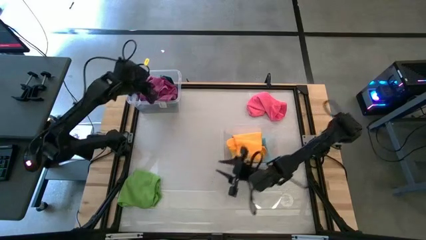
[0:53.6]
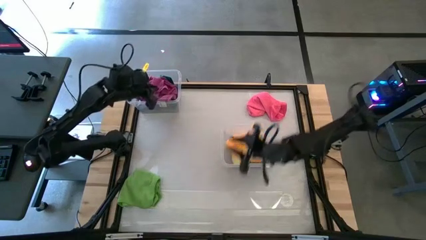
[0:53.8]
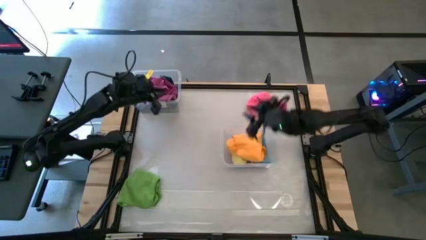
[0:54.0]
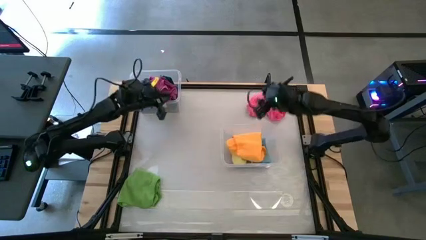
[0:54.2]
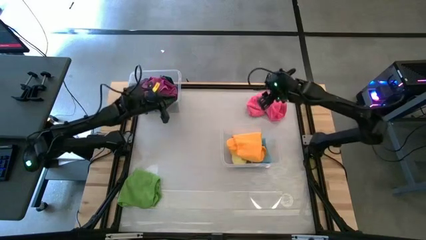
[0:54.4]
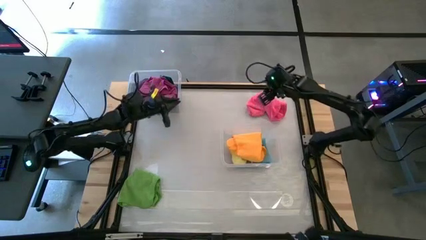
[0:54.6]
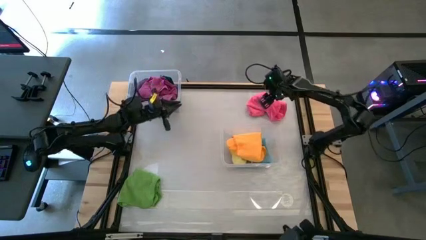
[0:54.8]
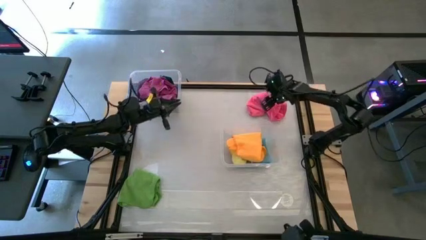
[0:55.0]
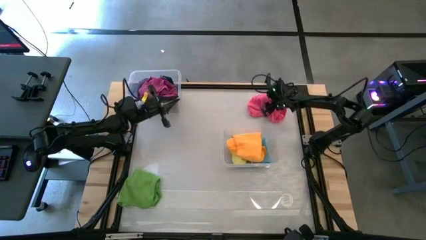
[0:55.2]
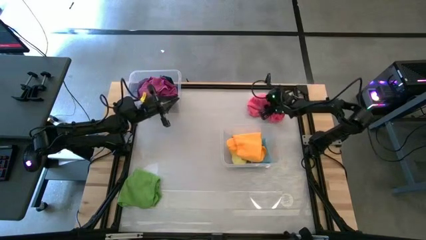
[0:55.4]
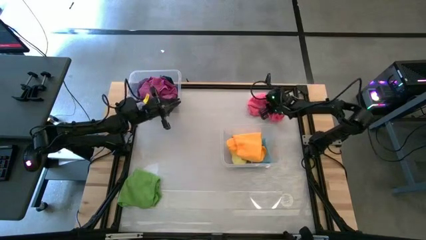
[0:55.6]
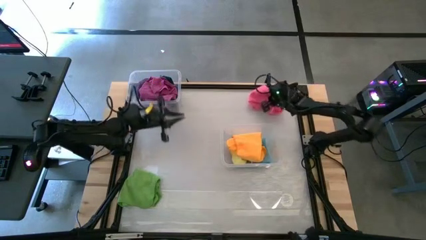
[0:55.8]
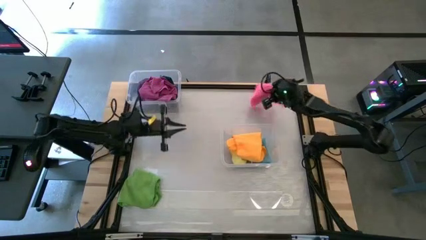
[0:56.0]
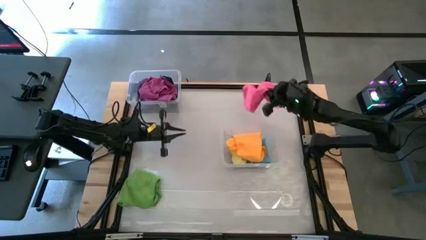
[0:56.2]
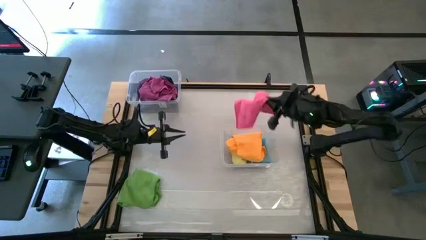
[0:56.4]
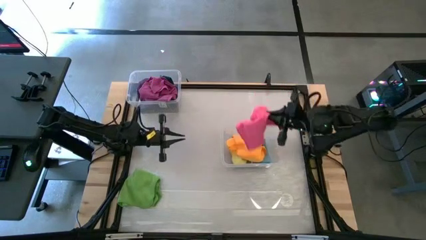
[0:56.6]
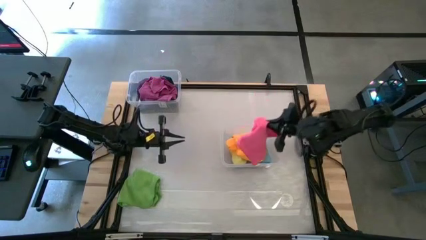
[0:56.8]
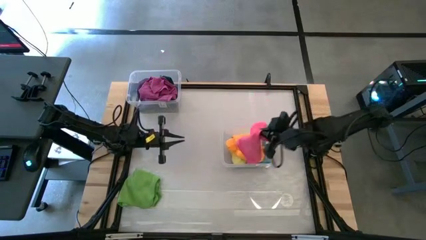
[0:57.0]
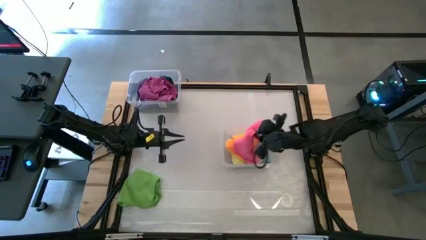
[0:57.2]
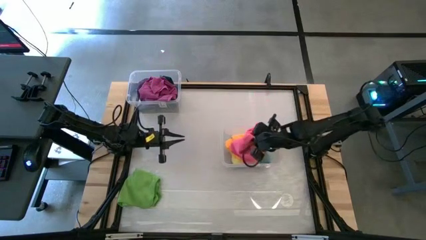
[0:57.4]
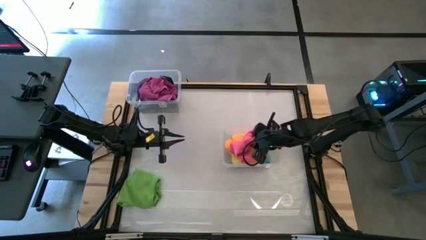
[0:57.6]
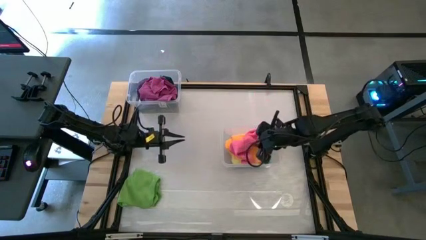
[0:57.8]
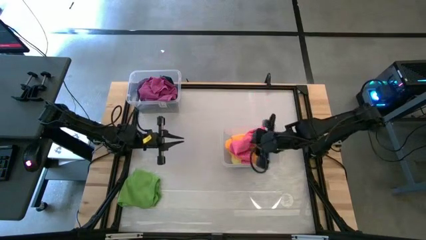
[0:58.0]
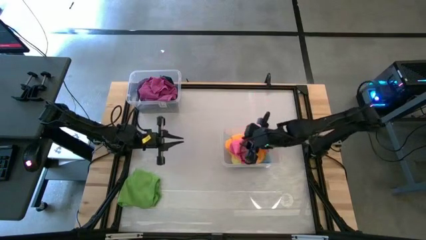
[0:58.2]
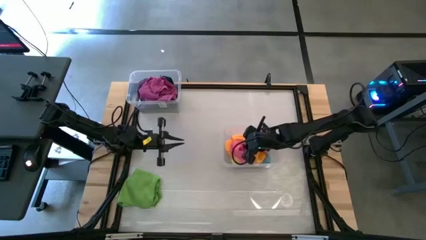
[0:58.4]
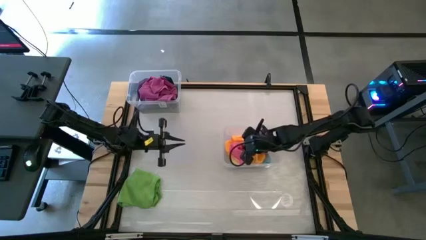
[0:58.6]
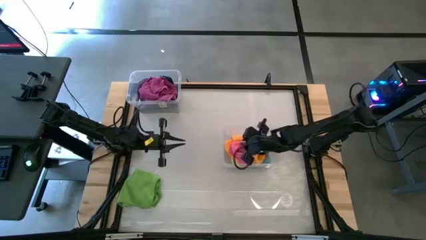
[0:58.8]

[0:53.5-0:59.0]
Task: Sort towels by color in basket
Put the pink towel into the bottom transparent bin

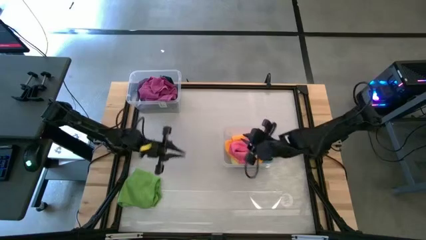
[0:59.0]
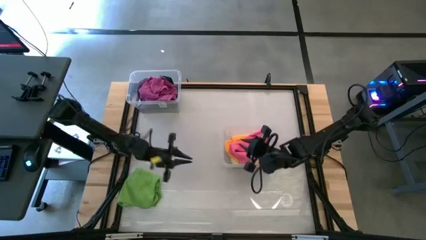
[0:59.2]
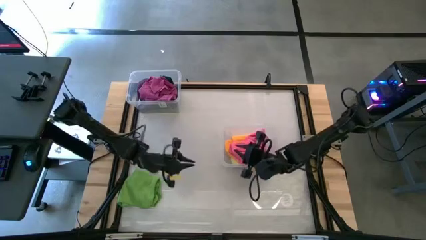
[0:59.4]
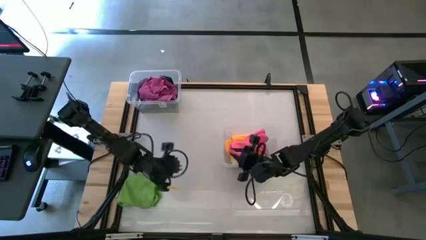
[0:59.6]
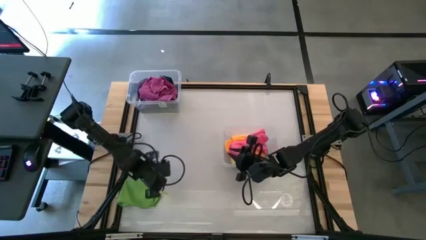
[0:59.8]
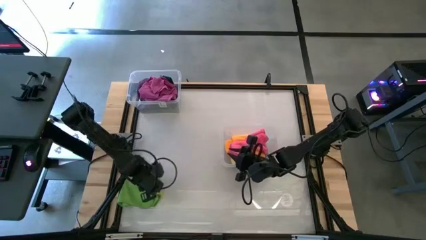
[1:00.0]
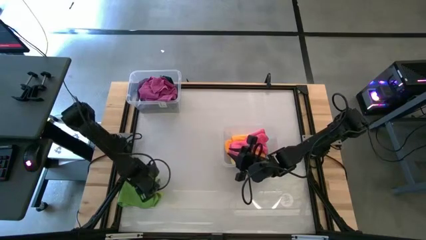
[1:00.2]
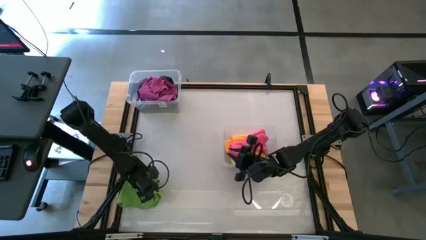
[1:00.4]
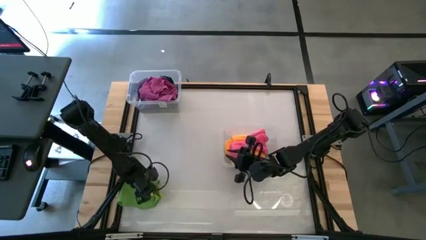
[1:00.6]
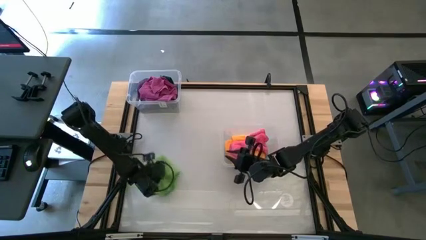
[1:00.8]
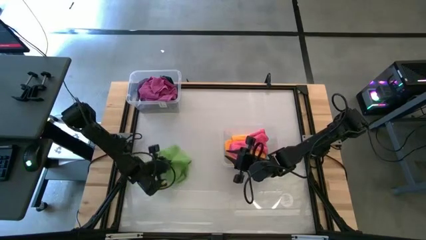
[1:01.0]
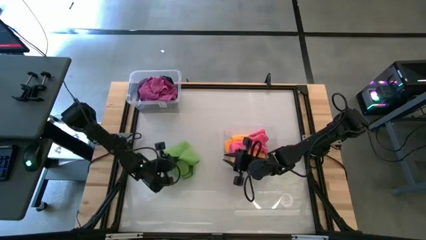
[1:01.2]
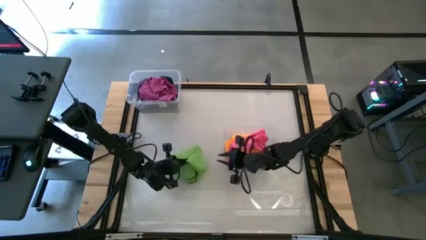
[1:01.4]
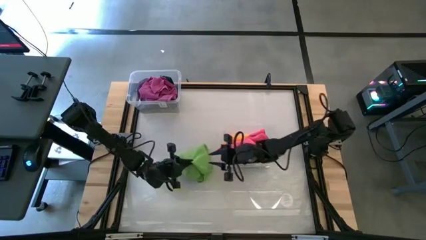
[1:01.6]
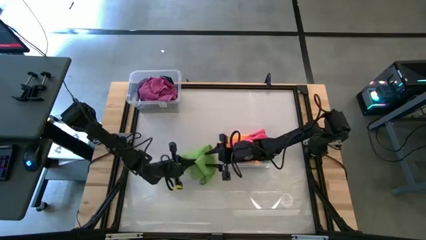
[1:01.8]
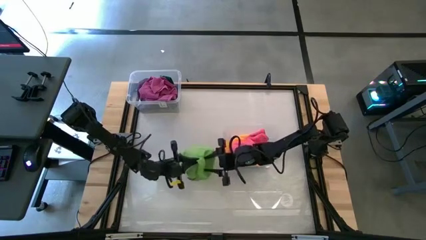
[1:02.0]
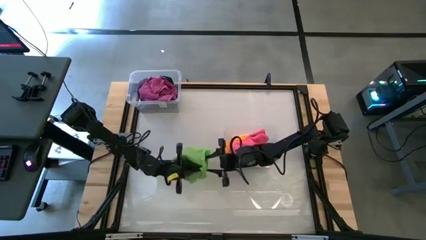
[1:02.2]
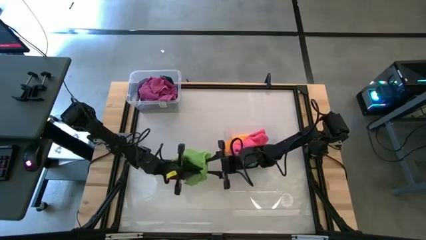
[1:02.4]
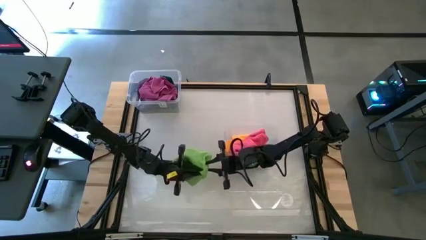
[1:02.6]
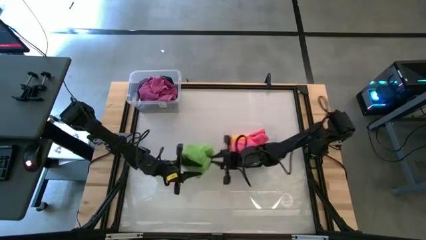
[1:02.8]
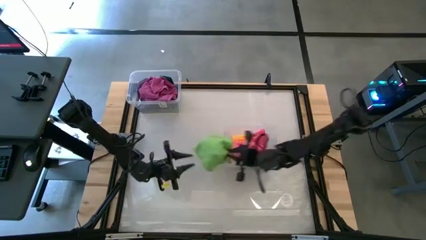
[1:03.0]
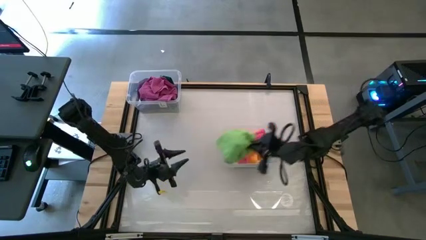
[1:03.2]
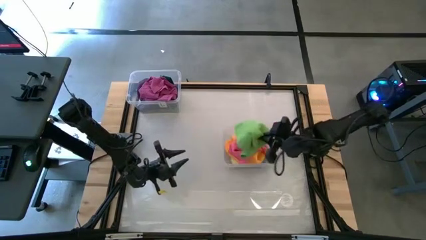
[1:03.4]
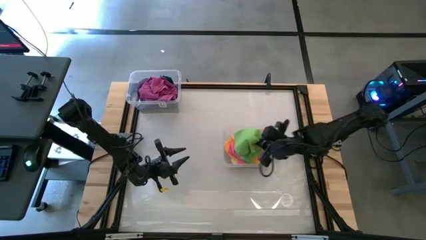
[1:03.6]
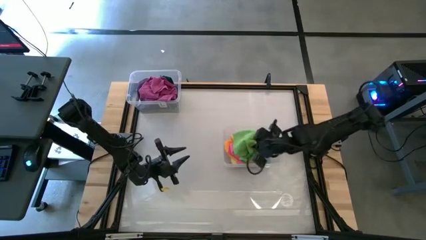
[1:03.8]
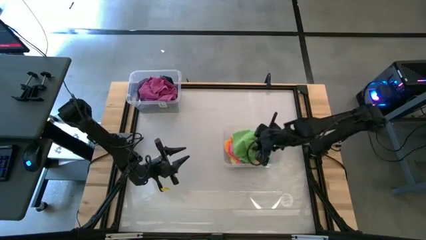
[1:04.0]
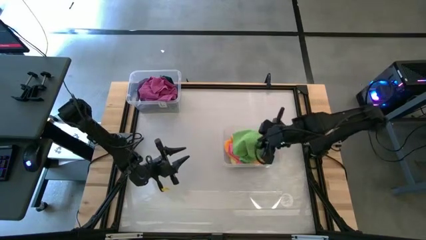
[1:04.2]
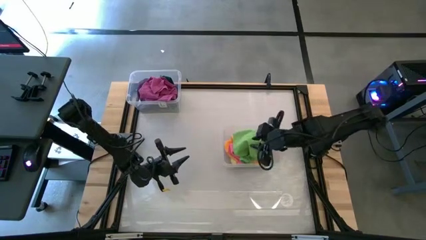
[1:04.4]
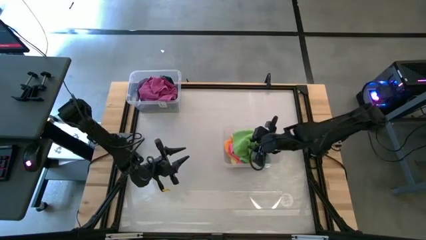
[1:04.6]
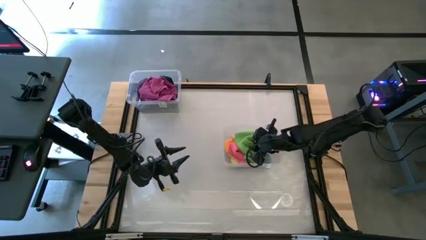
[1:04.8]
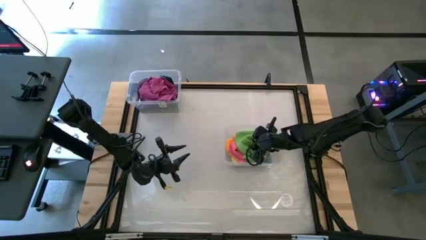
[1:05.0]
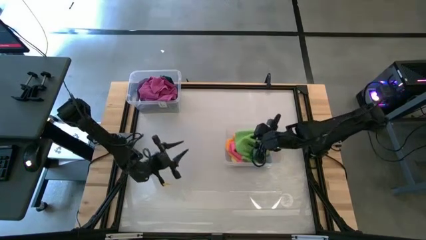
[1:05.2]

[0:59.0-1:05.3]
Put the green towel into the bottom transparent bin

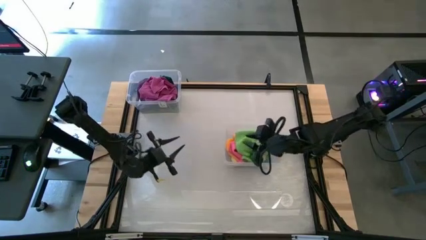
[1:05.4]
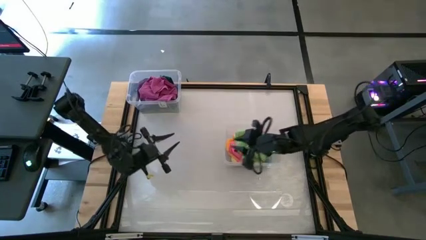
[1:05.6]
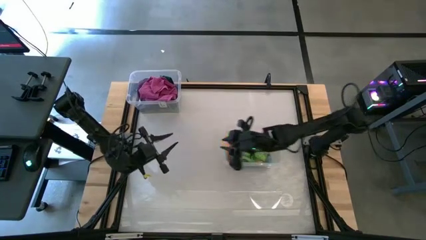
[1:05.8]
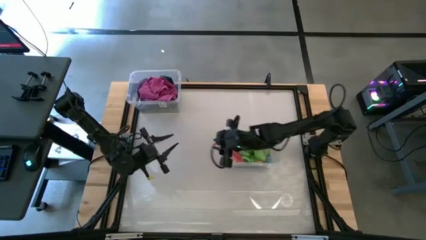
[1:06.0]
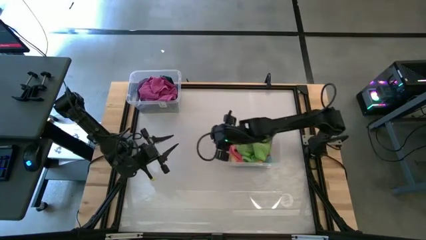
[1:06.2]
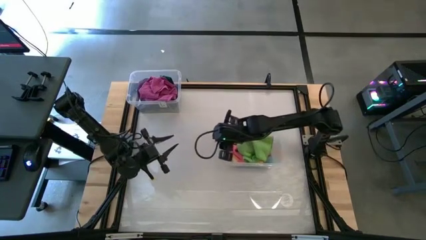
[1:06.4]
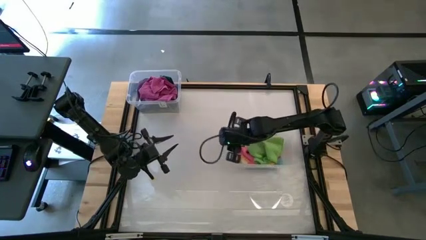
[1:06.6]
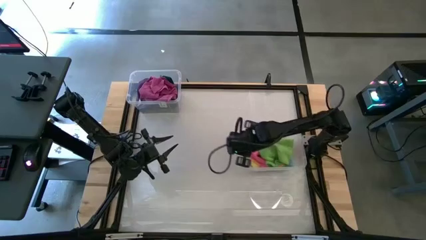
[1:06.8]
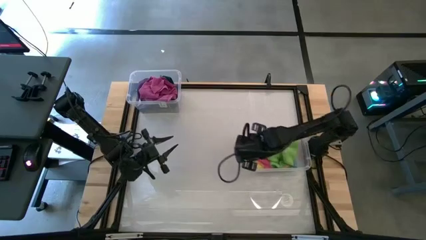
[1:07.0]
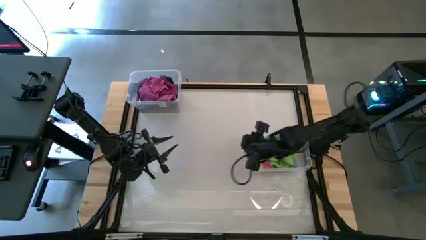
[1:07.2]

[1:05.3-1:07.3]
Move the transparent bin to the right of the table

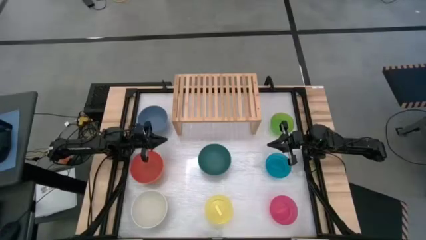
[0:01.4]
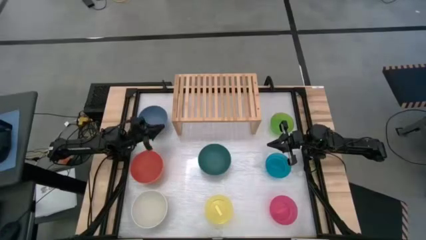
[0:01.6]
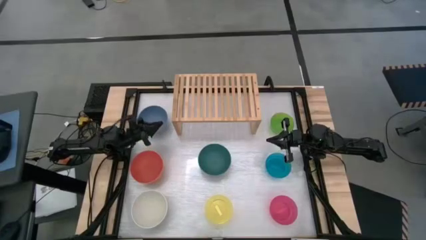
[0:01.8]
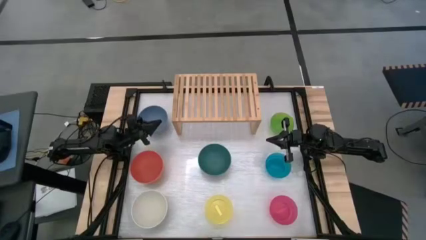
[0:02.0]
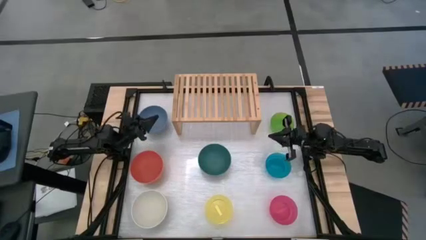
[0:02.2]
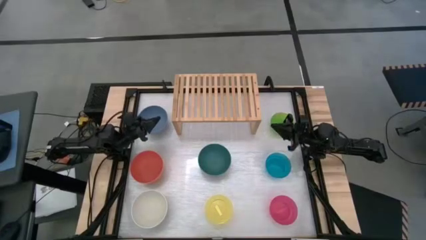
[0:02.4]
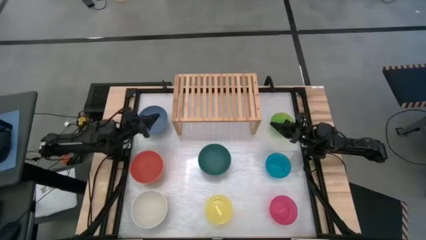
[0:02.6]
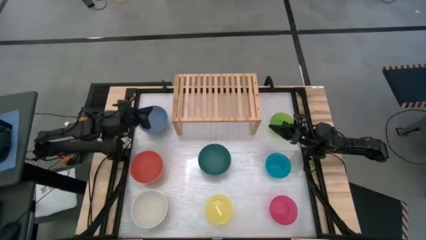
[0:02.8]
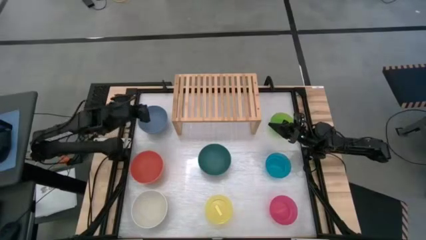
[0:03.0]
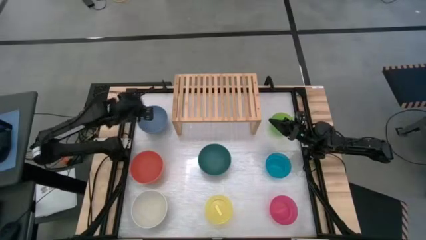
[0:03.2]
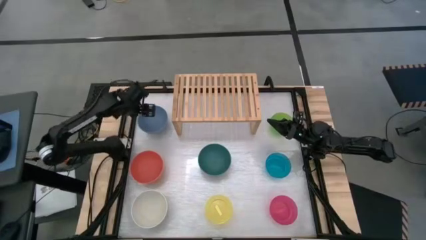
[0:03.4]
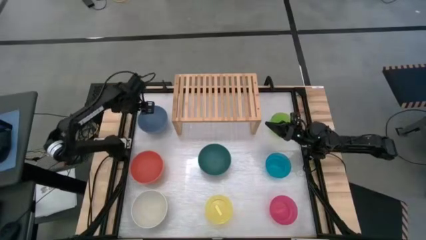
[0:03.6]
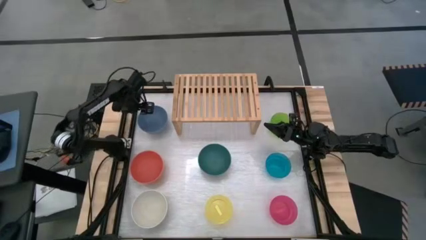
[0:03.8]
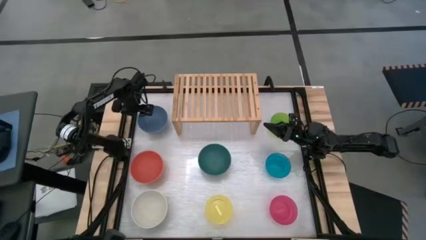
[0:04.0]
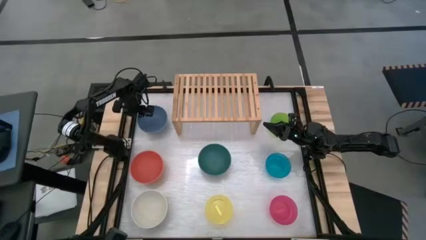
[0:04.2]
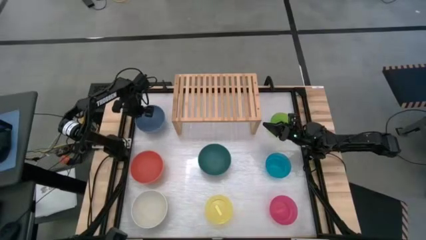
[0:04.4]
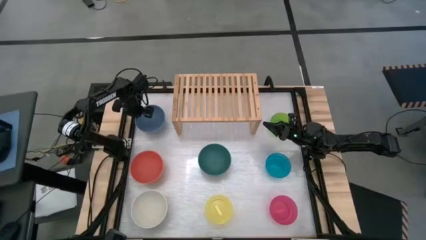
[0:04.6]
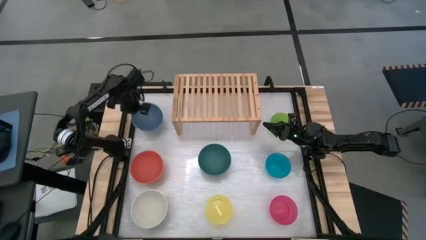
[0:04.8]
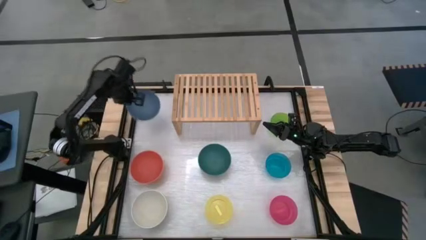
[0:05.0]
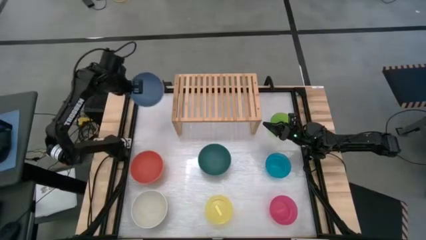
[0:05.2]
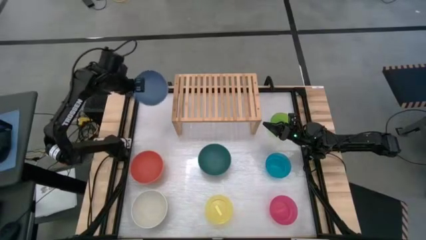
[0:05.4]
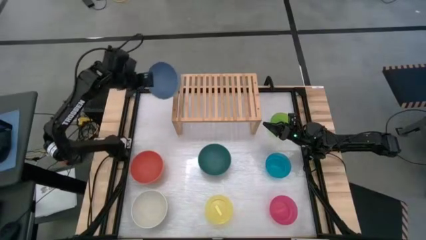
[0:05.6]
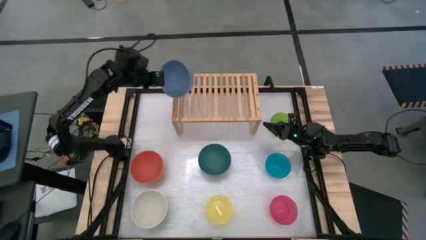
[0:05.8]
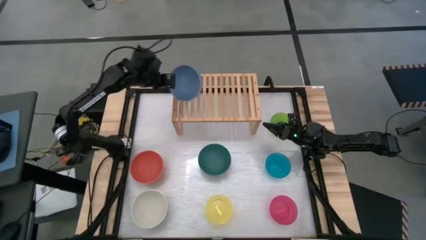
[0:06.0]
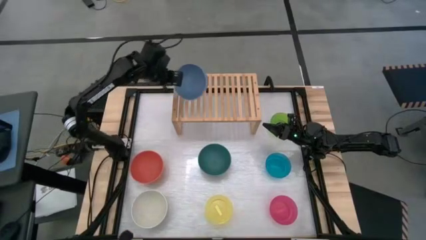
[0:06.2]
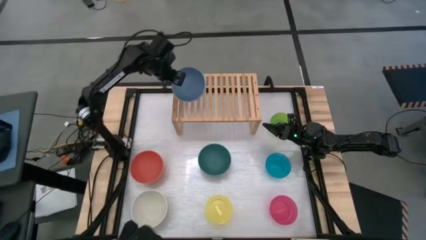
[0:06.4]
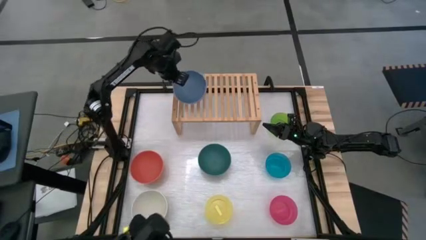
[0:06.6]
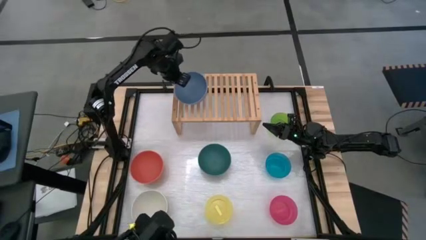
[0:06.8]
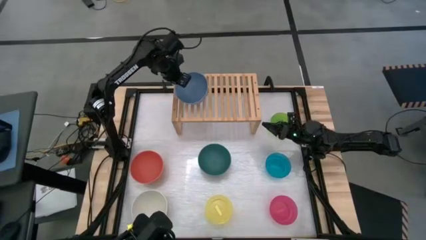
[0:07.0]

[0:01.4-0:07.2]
Task: Place and stack bowls onto a shelf
Put the dark blue bowl onto the shelf
